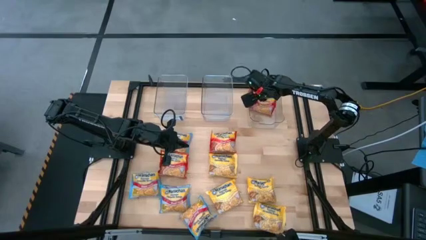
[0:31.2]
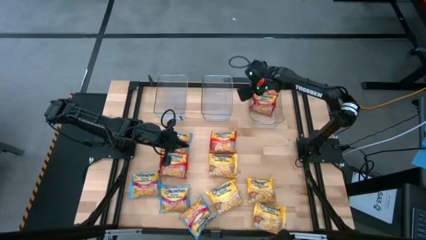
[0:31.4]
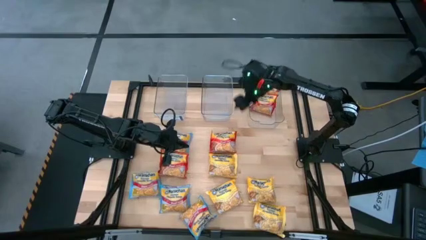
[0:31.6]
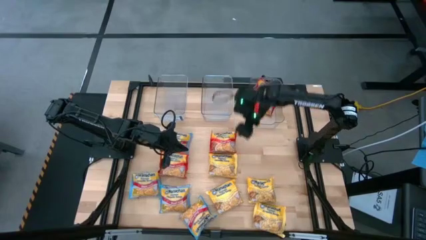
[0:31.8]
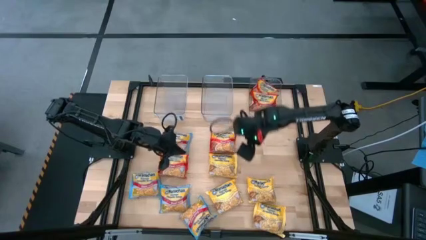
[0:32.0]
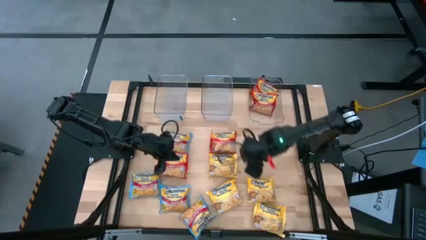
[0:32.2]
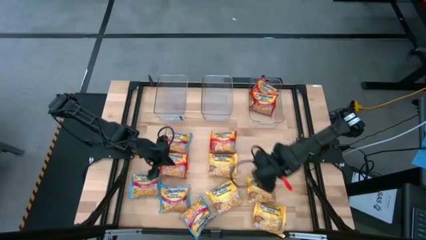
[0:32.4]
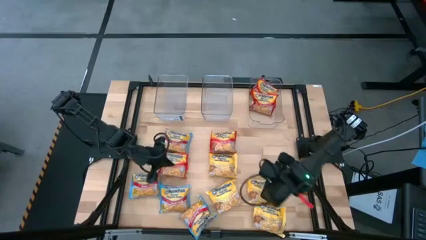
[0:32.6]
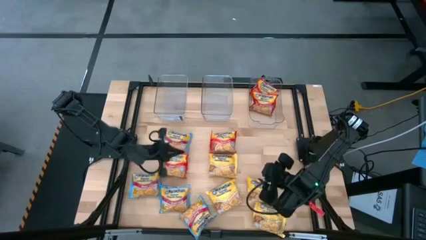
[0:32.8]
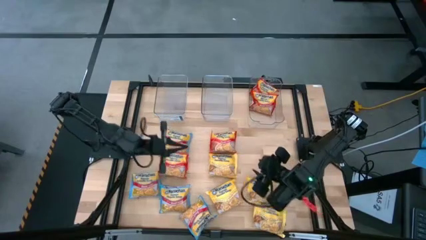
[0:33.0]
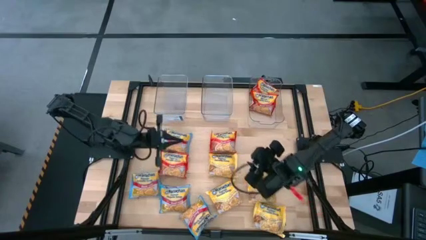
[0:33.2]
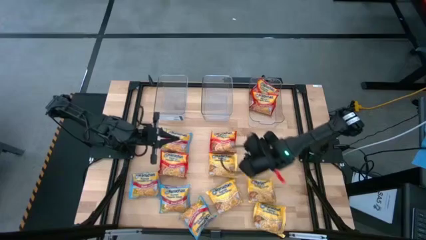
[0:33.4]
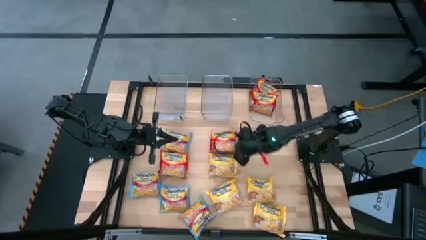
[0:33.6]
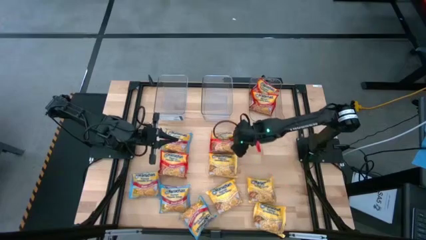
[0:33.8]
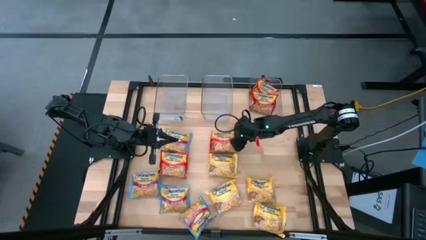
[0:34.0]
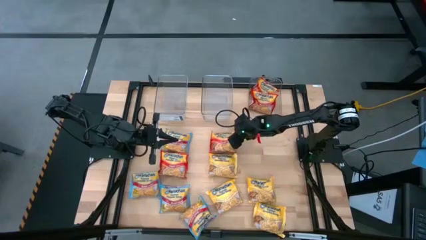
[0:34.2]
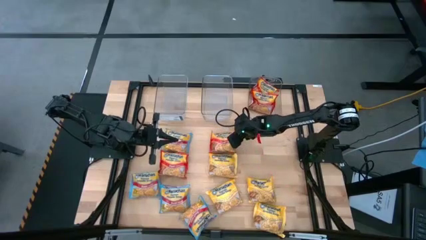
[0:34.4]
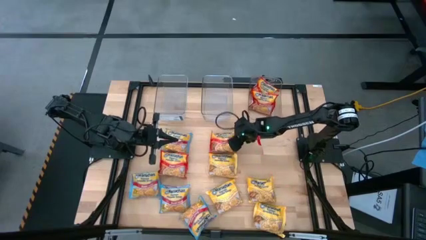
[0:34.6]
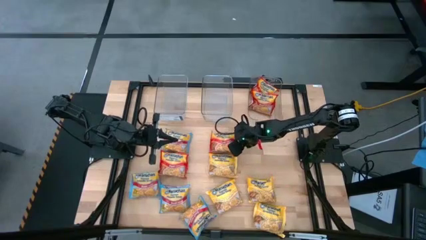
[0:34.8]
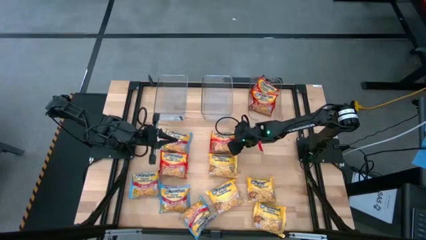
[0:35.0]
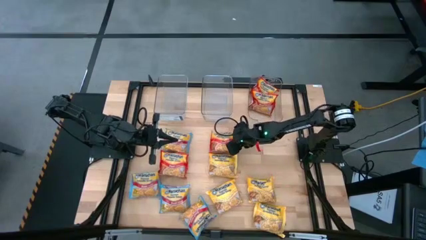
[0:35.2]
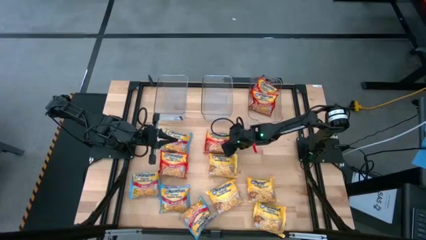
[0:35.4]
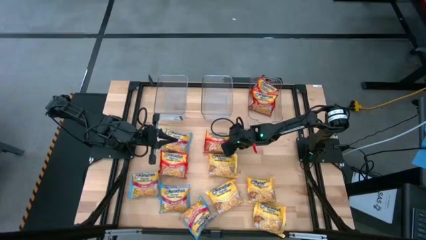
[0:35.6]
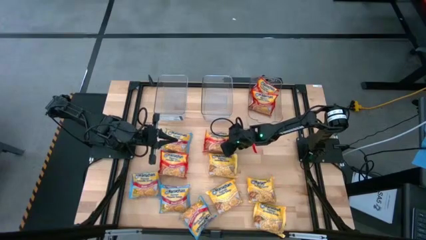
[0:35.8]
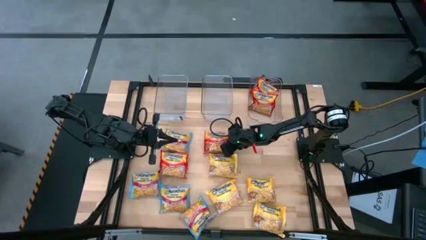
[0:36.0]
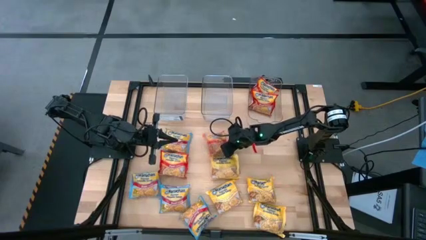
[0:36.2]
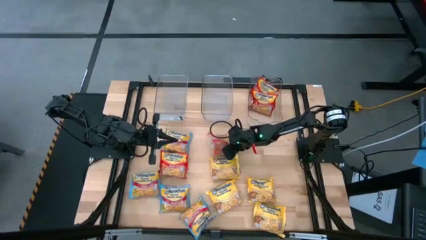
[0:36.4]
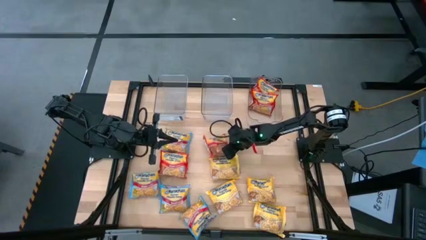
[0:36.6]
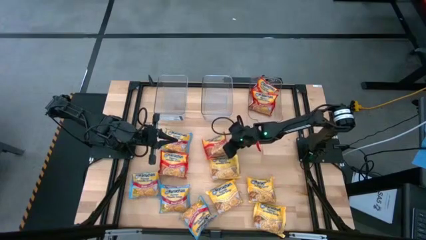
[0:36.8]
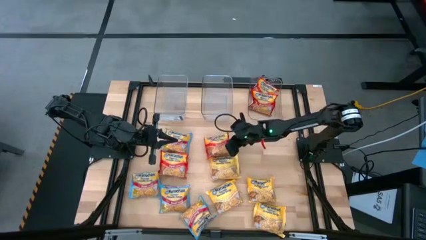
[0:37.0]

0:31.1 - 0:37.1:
Task: Sort Maruchan noodles
Put the red noodle pack into the right transparent bin

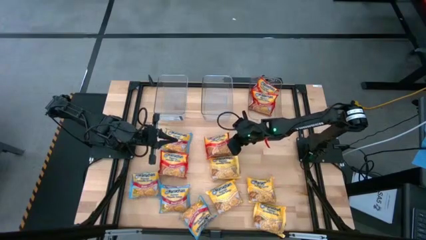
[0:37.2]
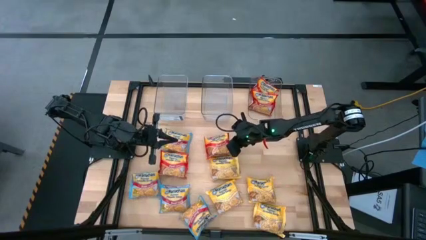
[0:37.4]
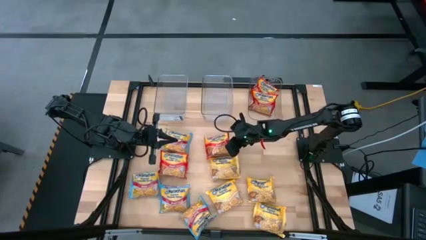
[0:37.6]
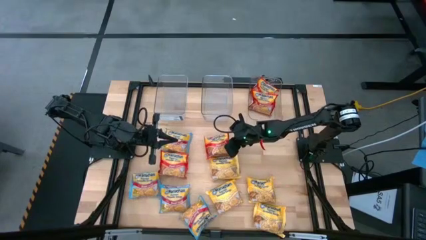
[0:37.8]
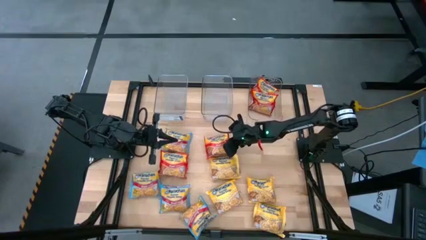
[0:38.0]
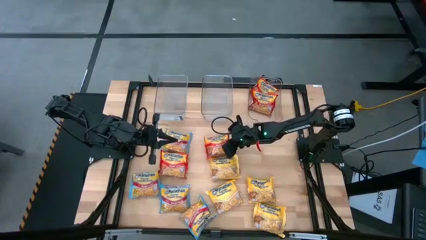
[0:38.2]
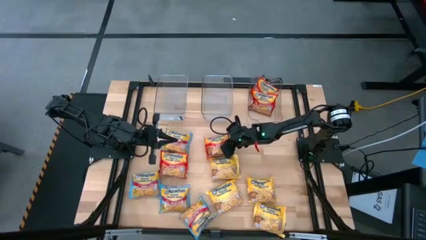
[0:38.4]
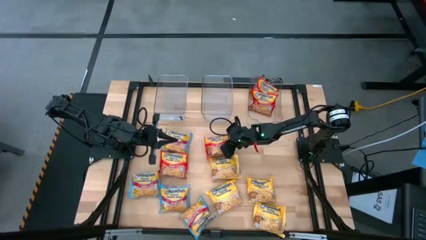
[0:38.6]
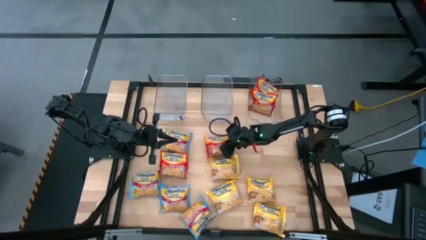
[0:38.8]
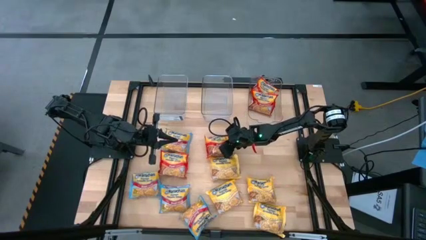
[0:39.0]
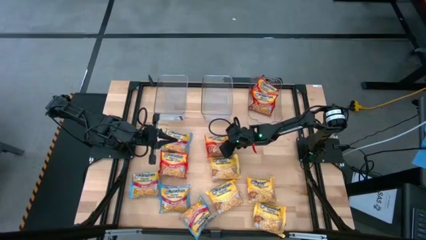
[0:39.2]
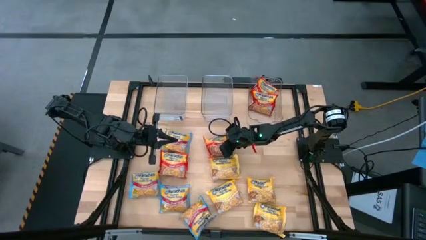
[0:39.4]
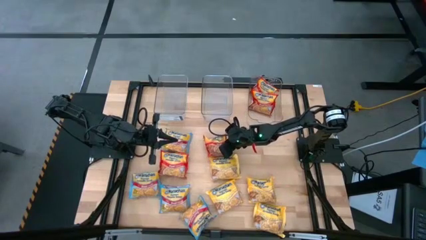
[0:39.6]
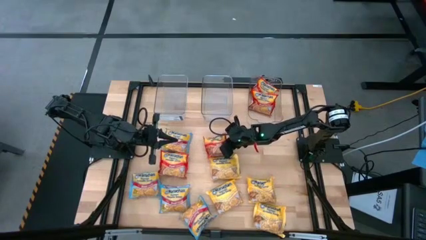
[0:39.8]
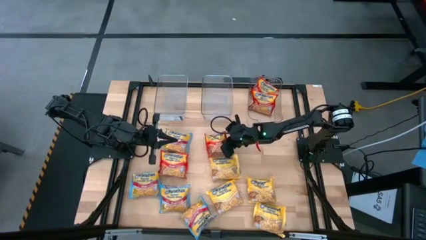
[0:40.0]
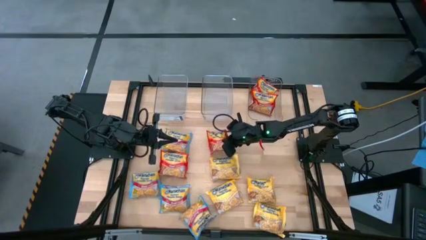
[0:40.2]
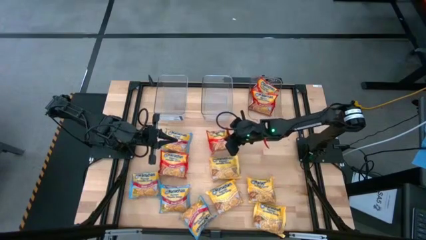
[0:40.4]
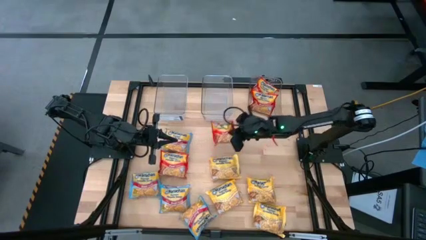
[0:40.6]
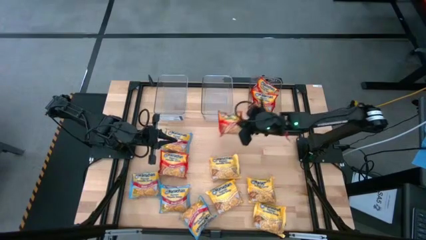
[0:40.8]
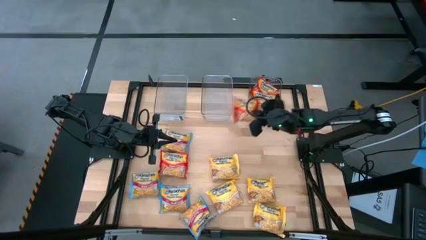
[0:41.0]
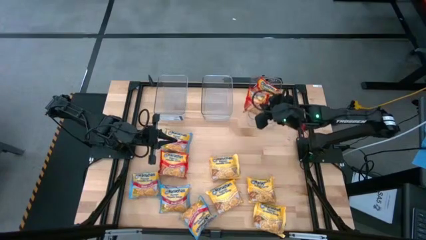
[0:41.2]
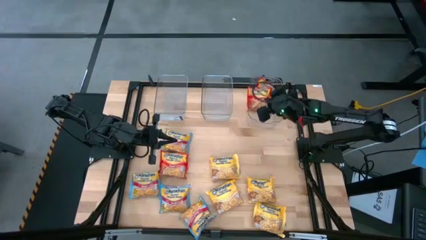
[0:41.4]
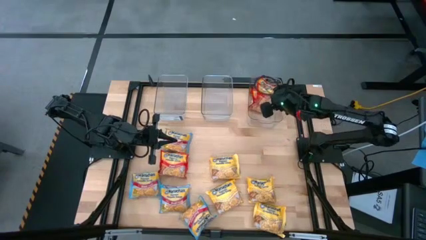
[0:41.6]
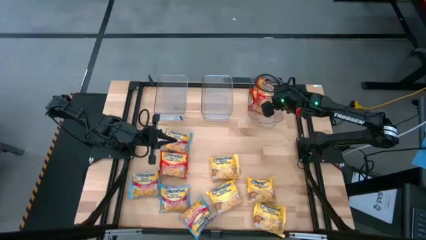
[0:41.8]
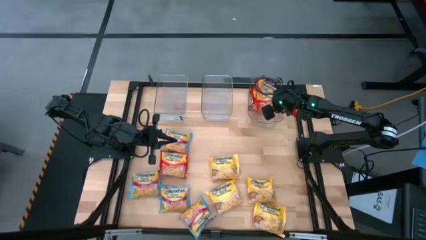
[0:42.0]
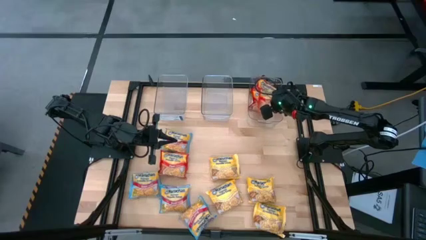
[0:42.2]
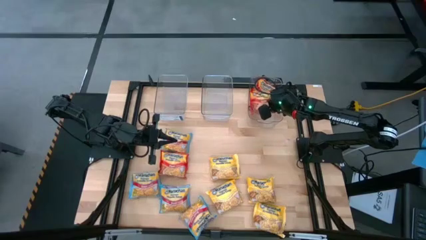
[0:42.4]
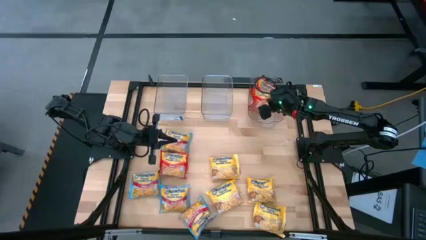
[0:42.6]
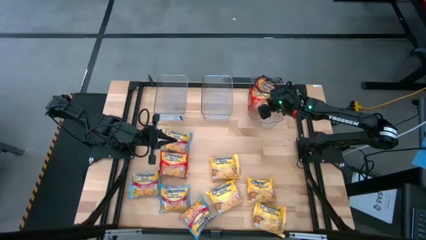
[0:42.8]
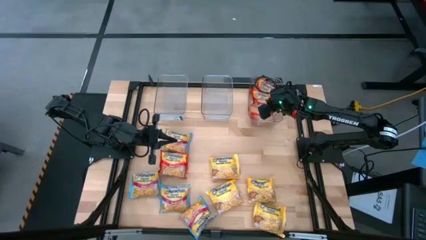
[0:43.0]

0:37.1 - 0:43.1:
Put the red noodle pack into the right transparent bin

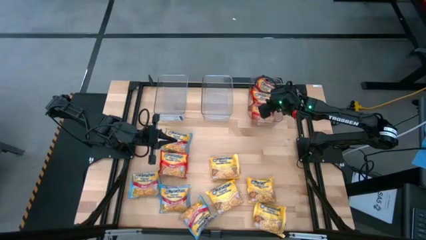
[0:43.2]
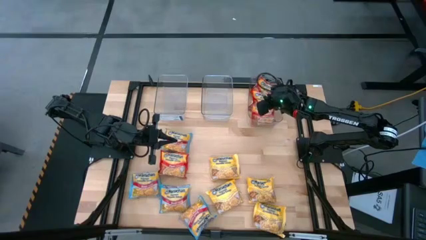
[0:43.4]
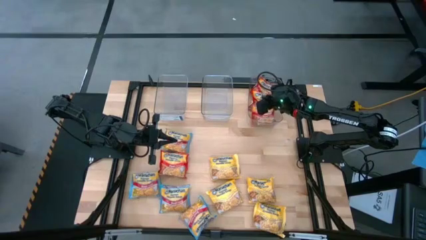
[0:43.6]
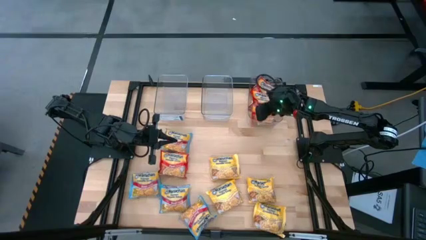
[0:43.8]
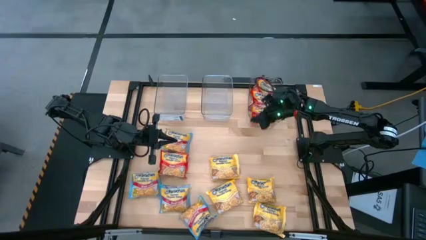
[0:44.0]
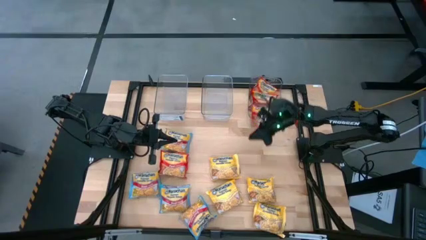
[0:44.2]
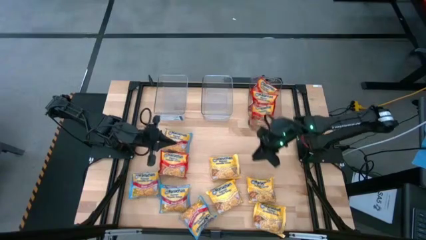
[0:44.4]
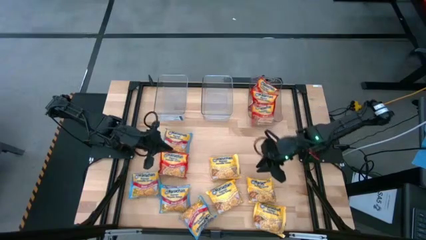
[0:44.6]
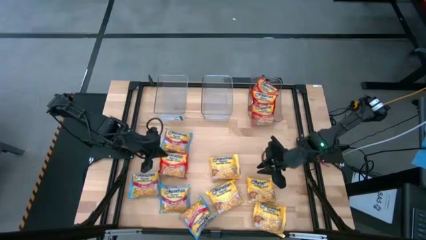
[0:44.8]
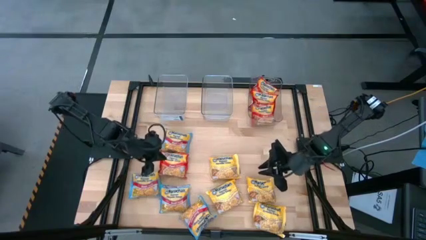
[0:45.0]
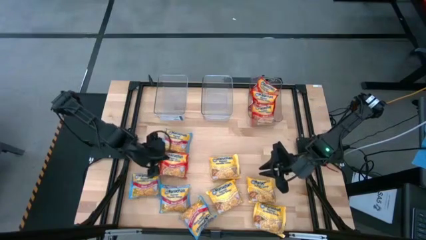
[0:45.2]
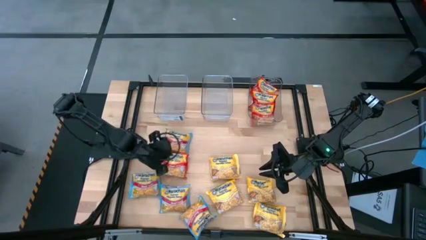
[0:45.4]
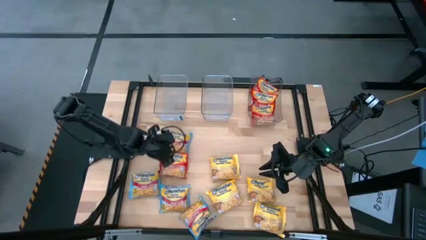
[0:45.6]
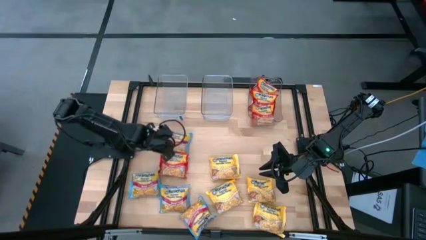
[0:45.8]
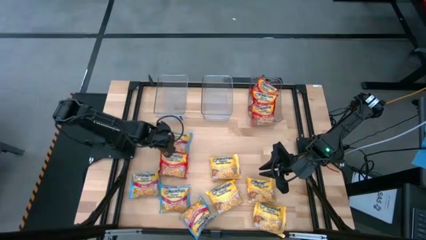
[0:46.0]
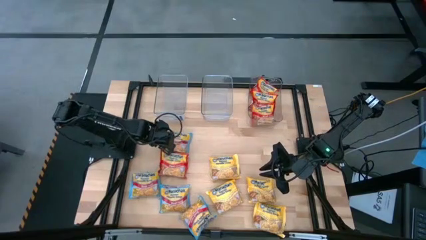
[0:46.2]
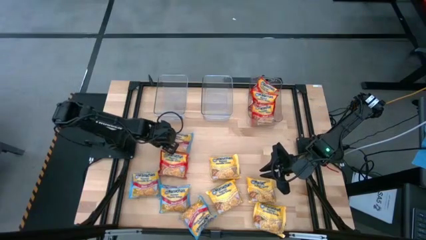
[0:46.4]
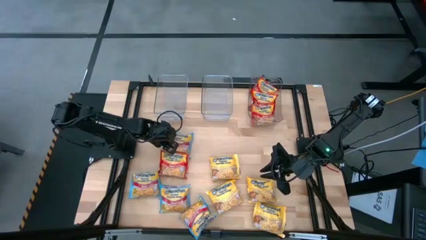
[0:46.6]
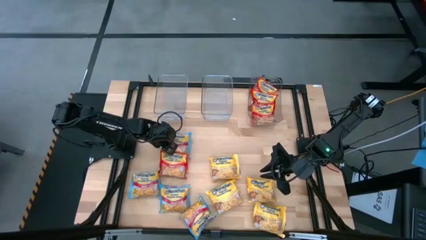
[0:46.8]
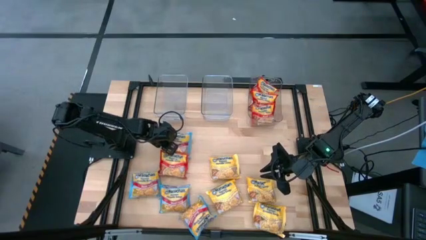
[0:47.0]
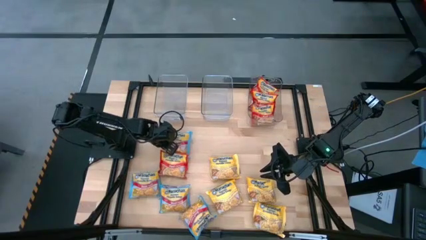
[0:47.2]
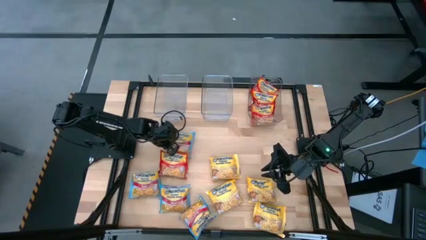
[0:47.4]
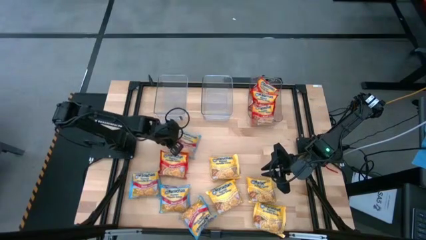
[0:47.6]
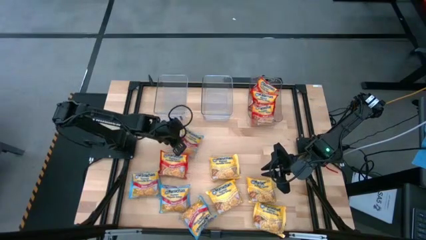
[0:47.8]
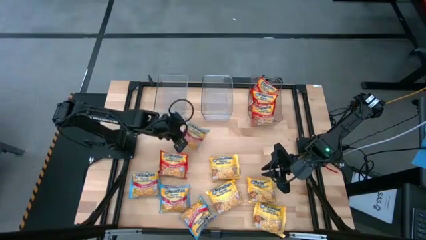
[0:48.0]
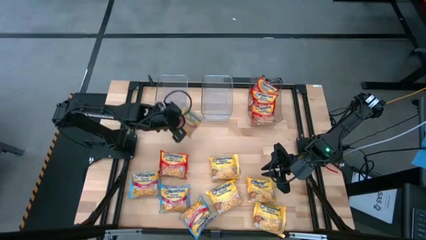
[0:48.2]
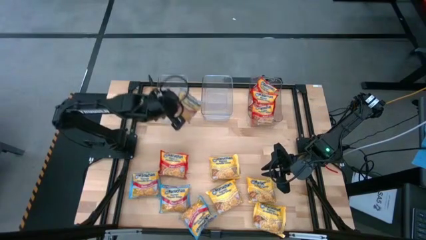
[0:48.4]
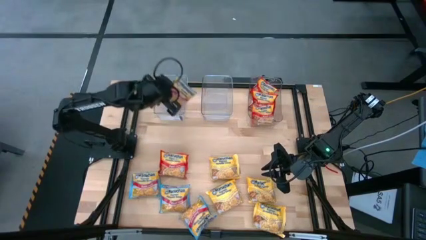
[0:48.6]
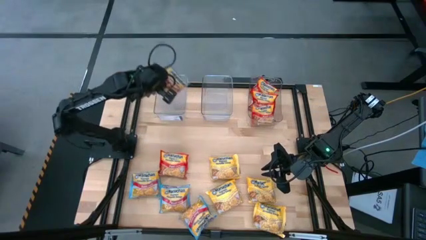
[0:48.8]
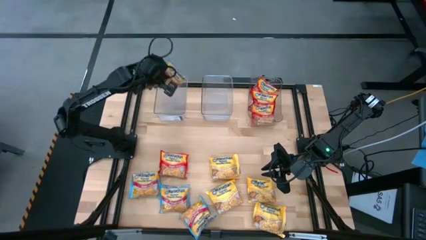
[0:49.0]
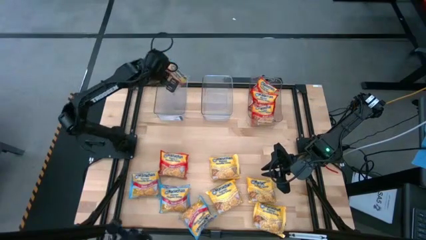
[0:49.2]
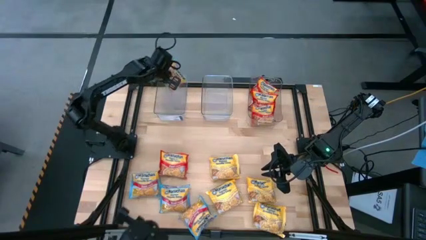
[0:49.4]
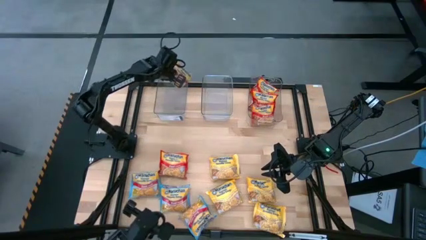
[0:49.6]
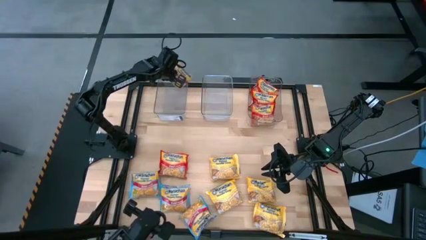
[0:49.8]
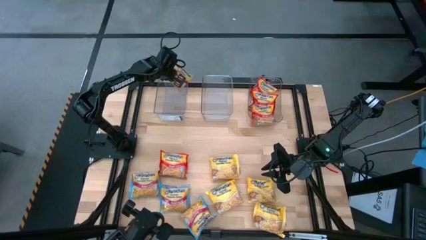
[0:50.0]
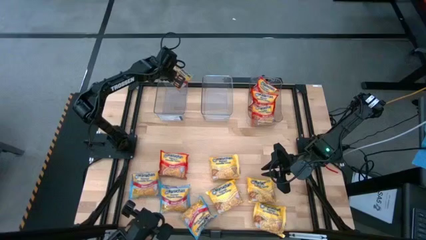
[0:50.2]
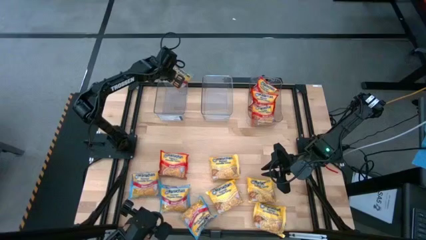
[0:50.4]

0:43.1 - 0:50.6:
Put the blue noodle pack into the left transparent bin
